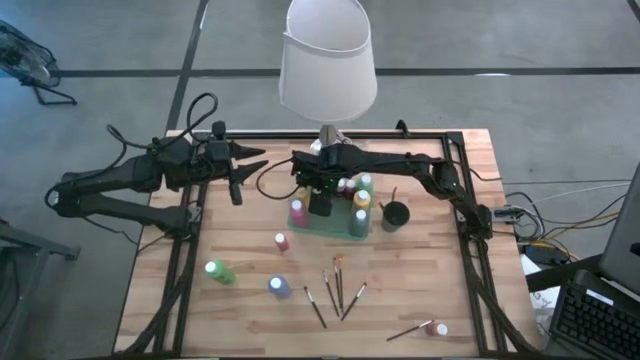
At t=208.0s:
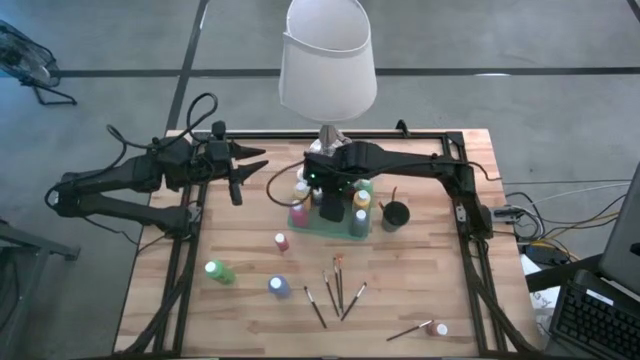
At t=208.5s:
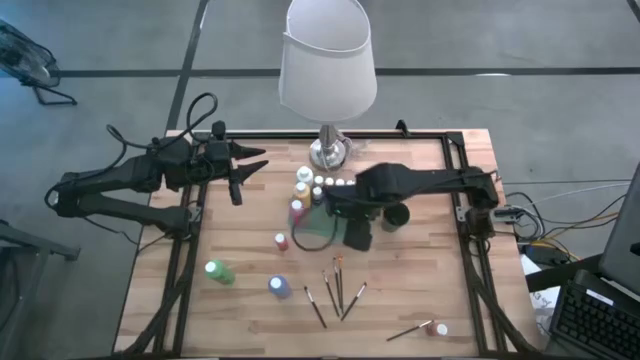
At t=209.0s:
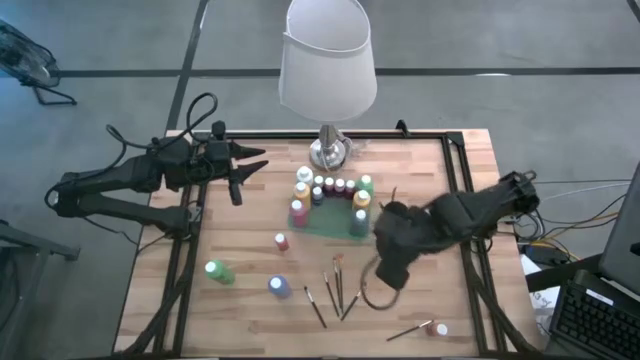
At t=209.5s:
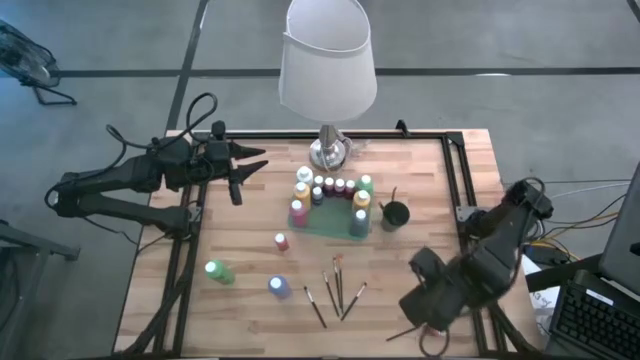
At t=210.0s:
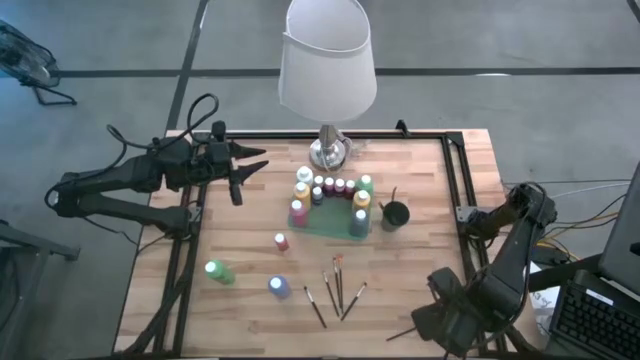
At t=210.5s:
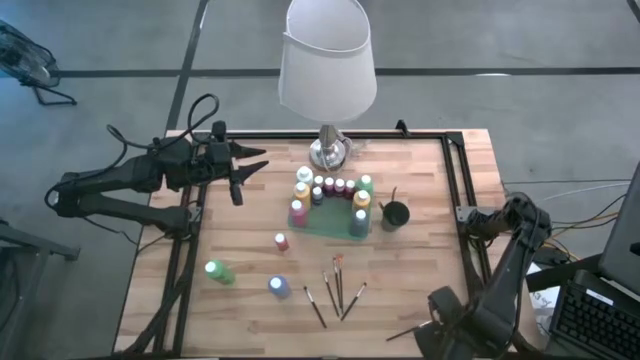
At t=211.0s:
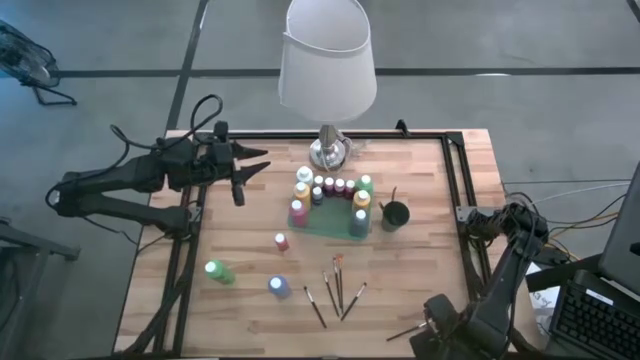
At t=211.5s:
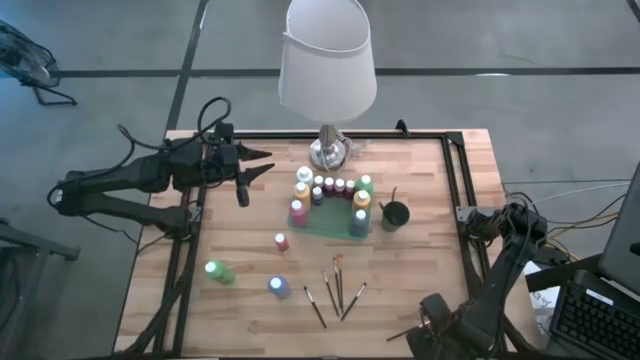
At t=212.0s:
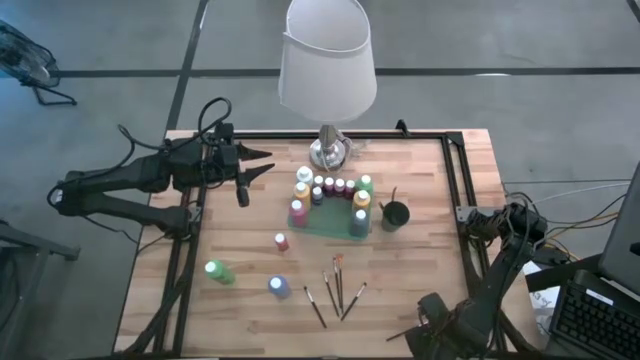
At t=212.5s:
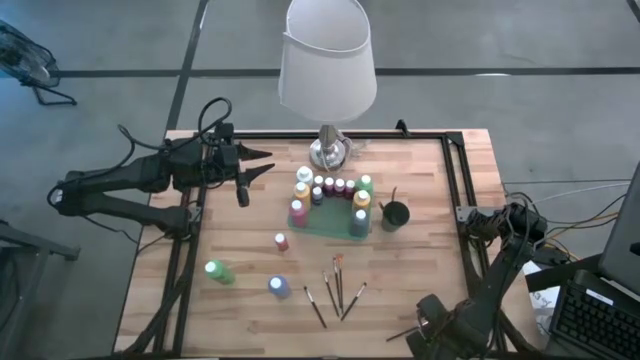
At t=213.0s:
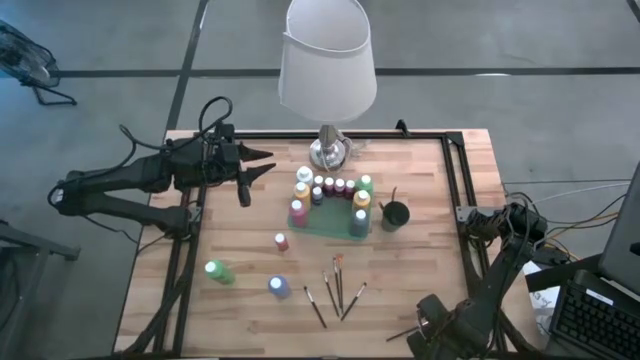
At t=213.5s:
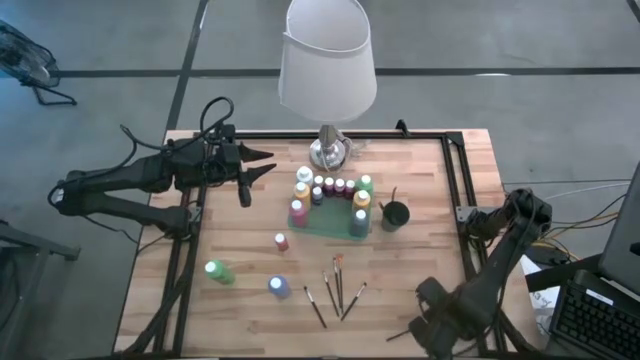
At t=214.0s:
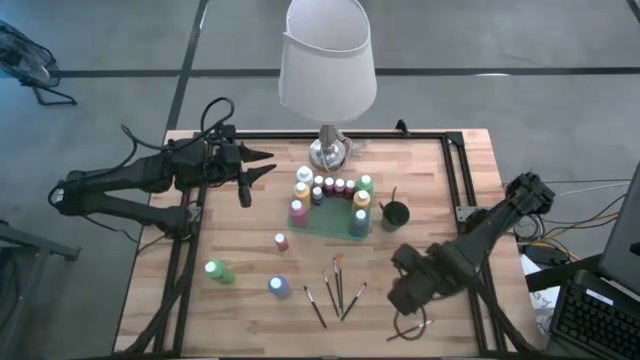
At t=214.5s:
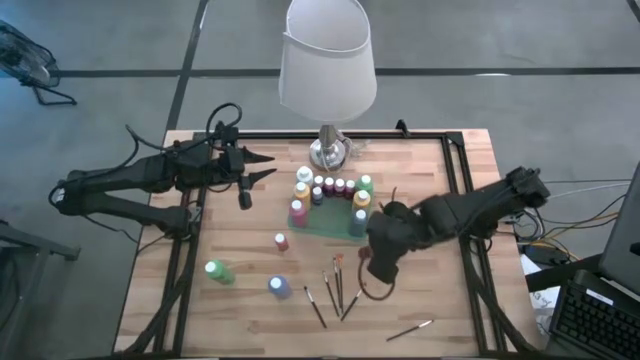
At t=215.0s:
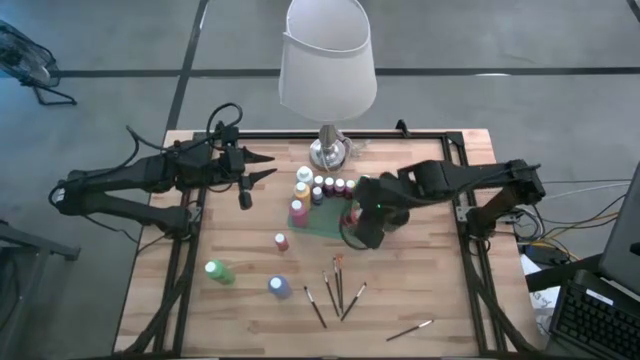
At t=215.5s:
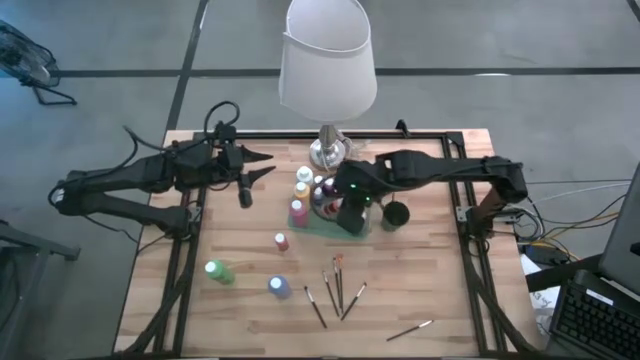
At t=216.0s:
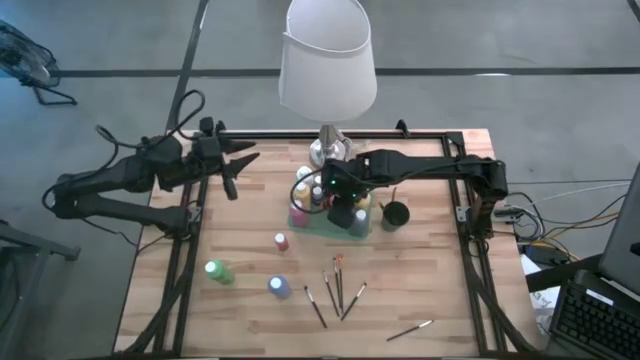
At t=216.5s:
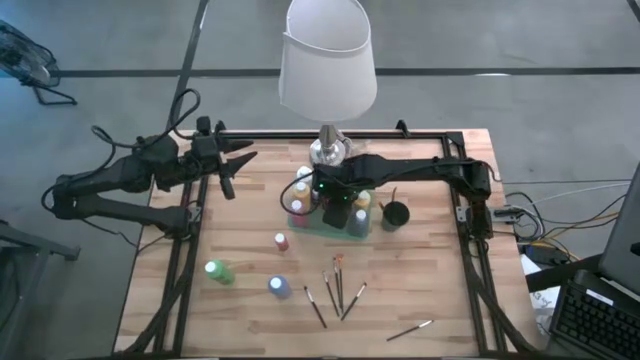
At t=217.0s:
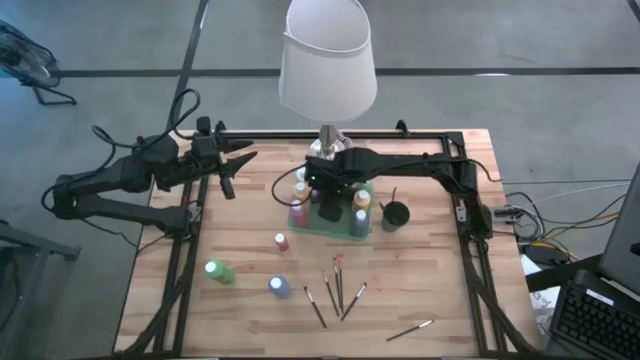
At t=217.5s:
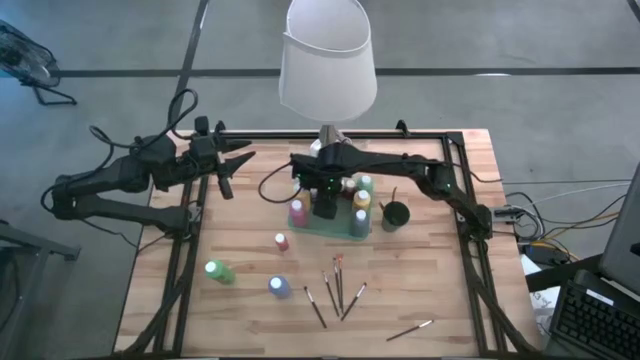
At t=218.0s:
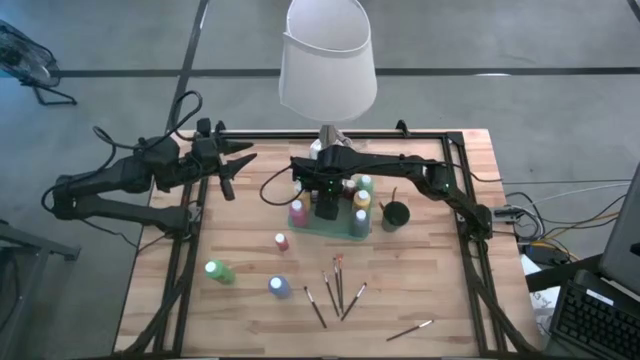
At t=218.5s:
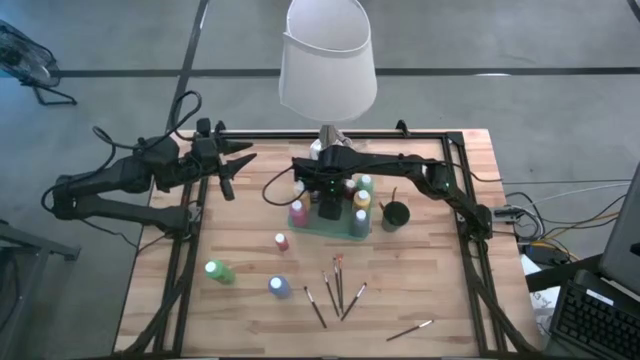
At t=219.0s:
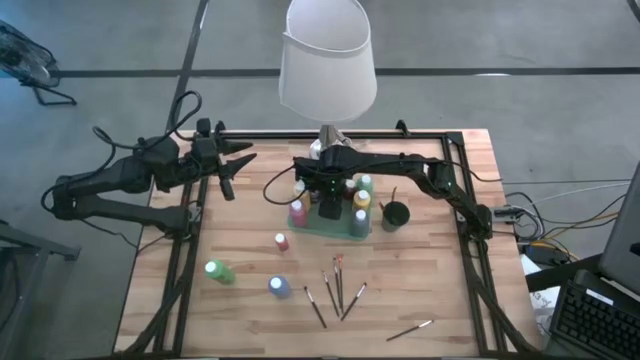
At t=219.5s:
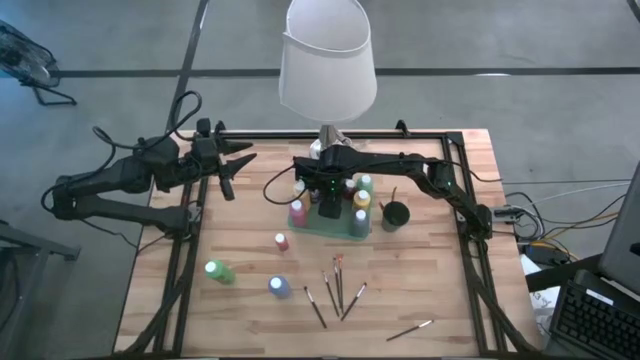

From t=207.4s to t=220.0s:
Task: Pick & Place Paint Supplies
Put the orange paint bottle into the green bin

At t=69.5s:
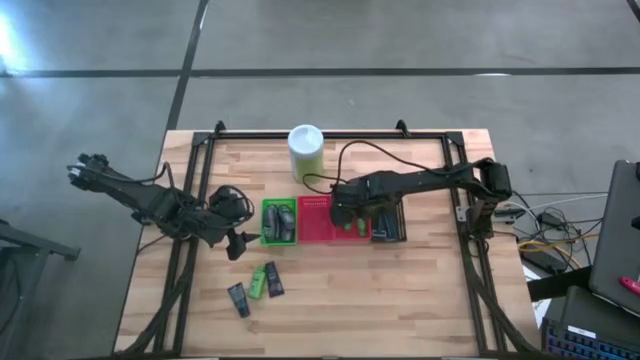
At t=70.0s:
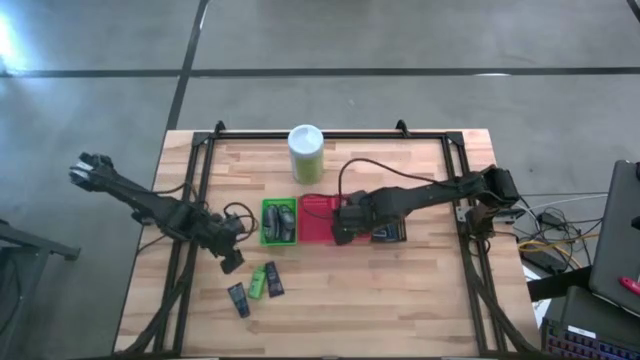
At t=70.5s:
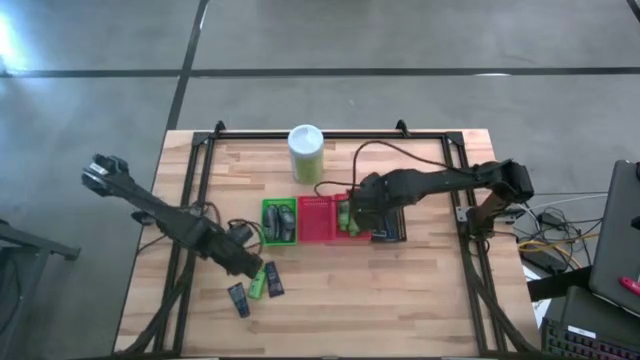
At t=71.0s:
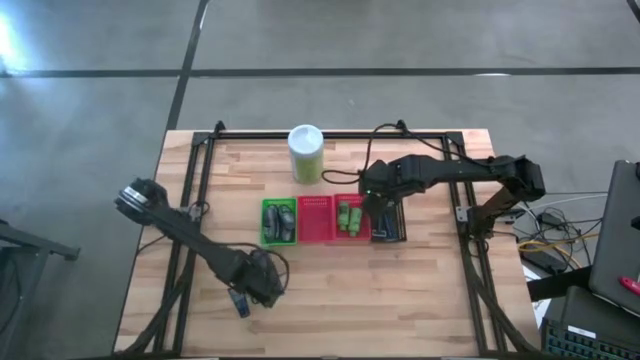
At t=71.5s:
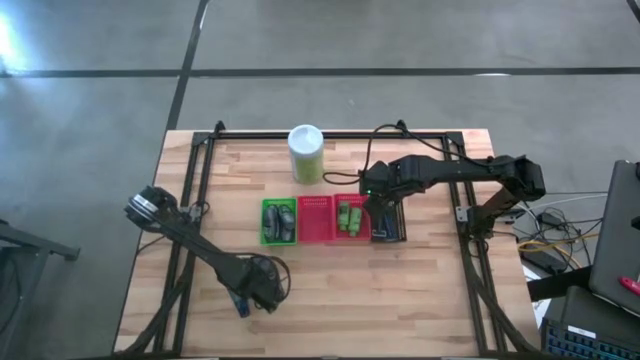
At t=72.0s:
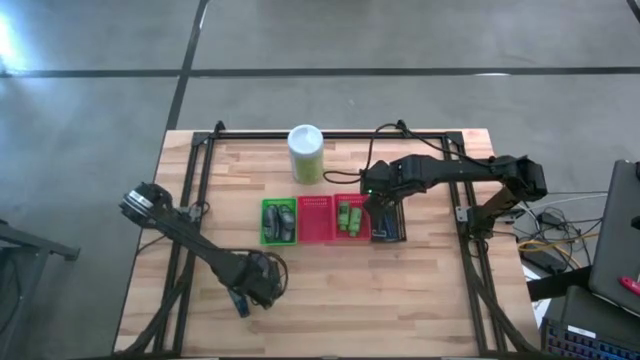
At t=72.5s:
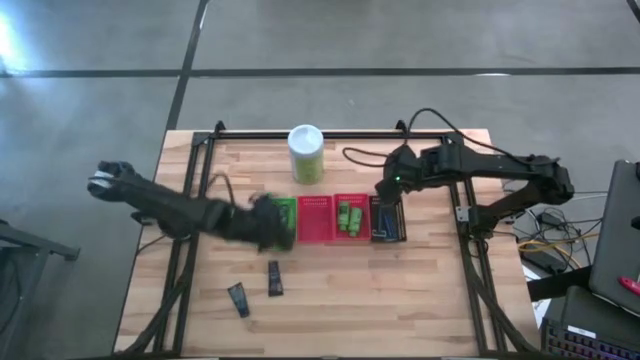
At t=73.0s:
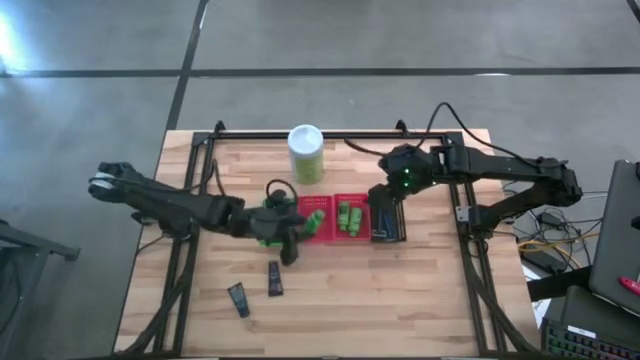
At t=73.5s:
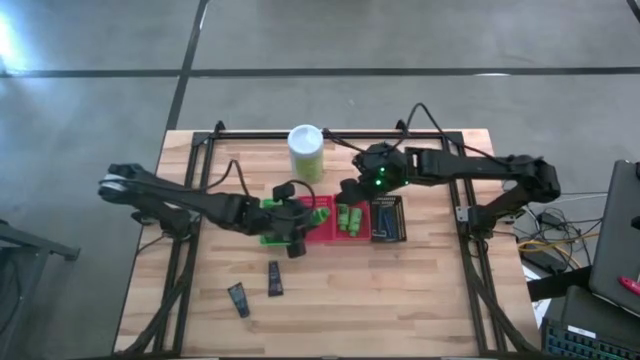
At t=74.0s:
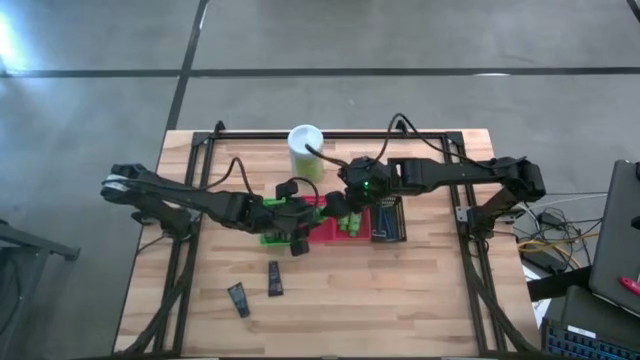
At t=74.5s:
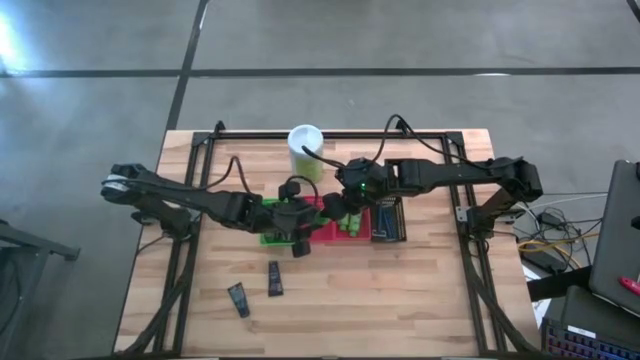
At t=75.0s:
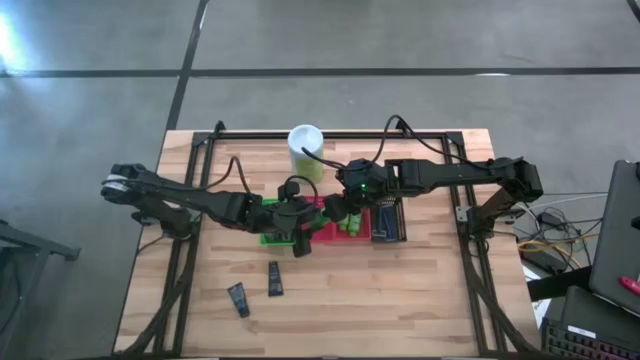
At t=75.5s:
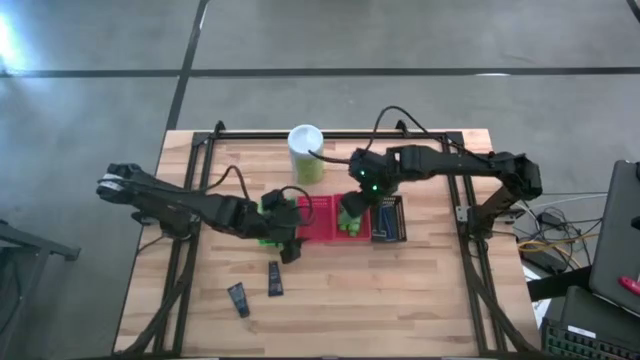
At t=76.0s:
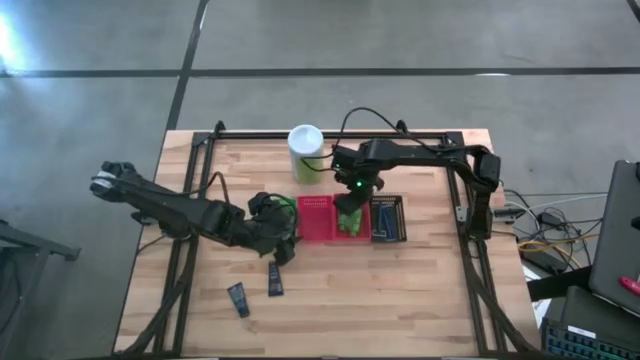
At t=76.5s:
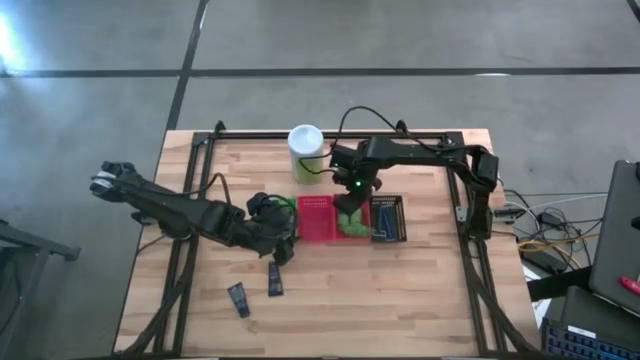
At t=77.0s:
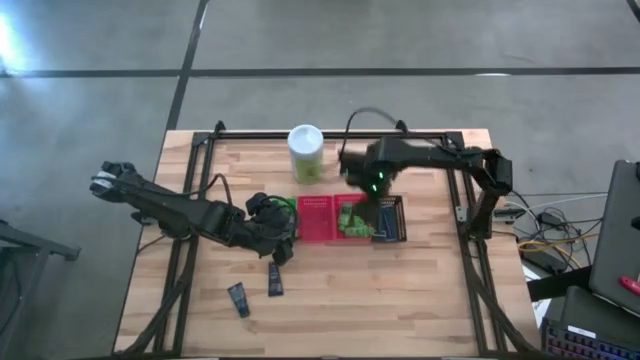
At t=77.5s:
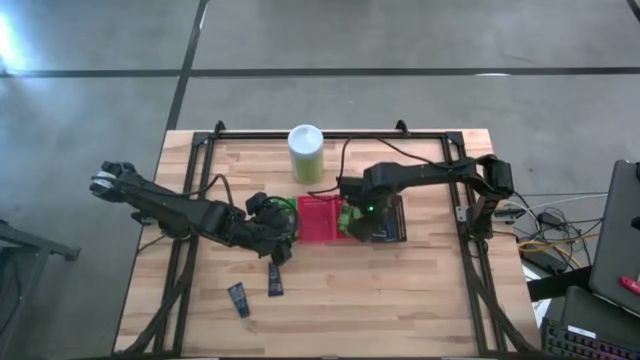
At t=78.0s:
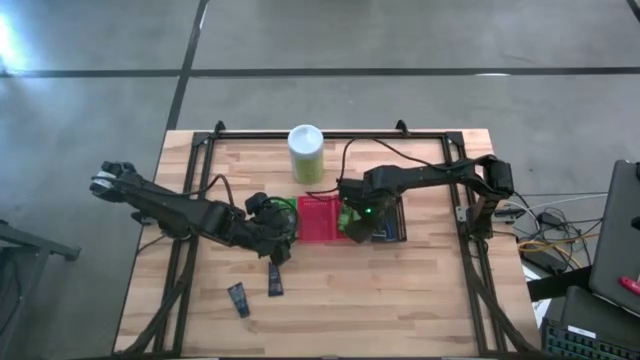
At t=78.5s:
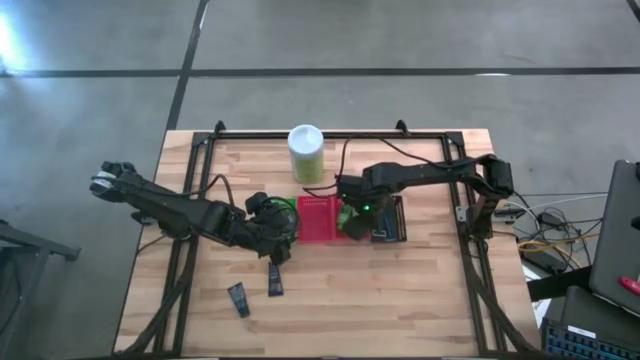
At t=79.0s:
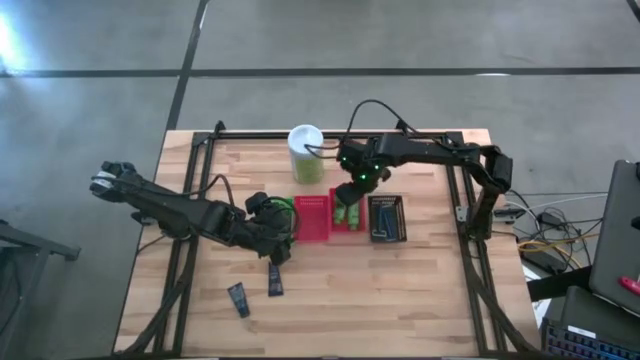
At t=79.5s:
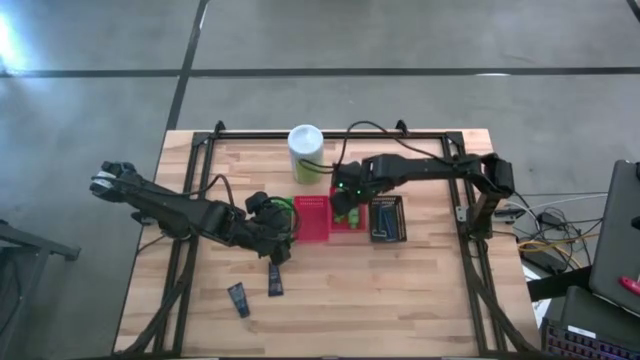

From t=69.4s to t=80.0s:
Task: Pick & Place Travel size toiletries
Put the green shampoo bottle into the right red bin
